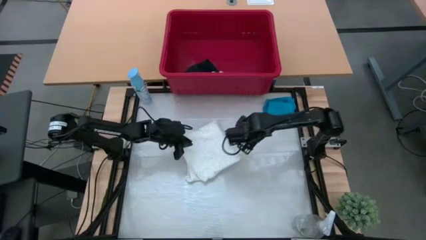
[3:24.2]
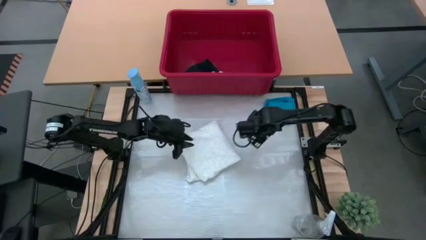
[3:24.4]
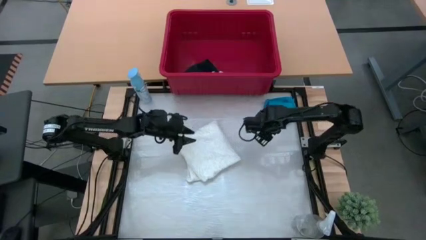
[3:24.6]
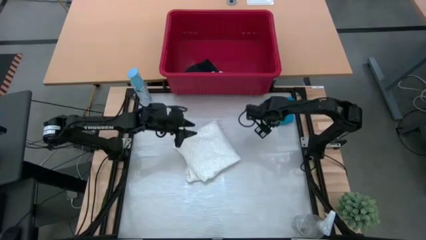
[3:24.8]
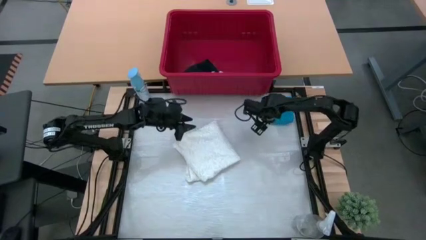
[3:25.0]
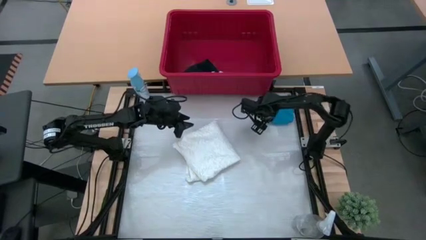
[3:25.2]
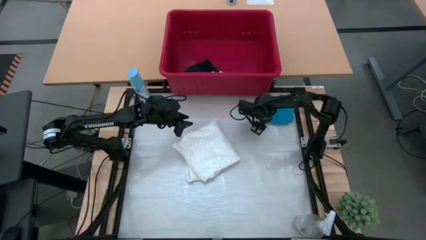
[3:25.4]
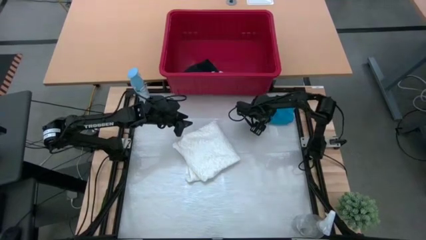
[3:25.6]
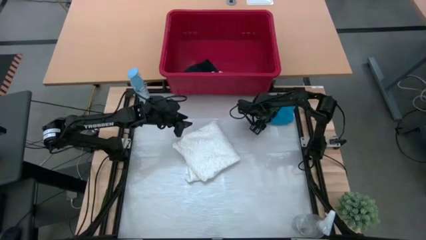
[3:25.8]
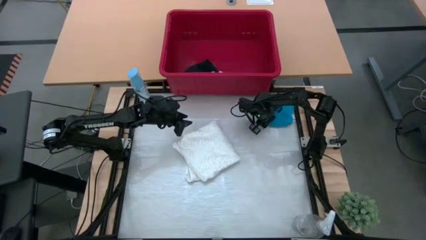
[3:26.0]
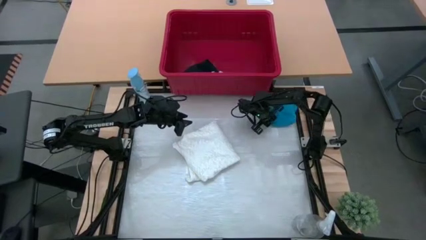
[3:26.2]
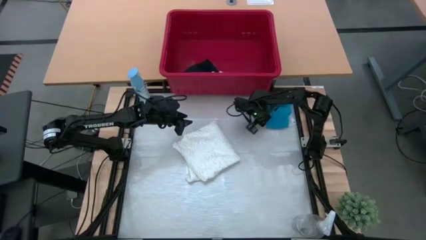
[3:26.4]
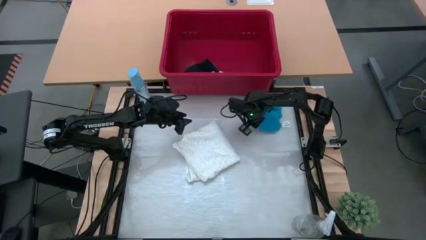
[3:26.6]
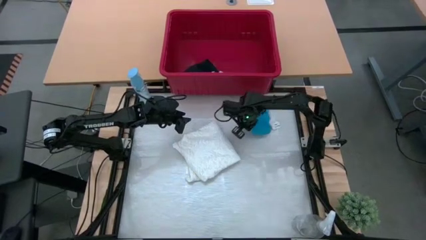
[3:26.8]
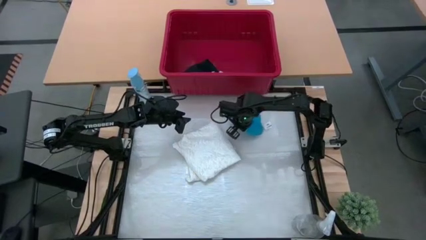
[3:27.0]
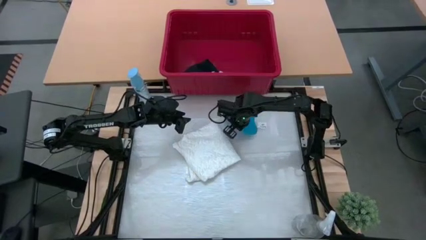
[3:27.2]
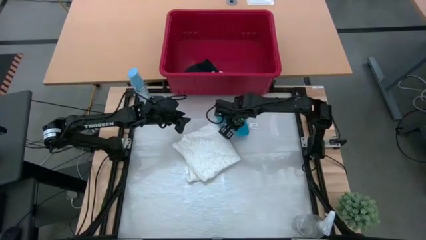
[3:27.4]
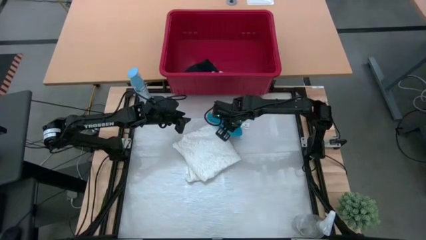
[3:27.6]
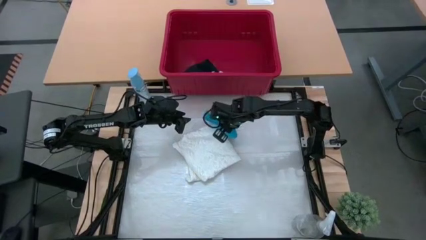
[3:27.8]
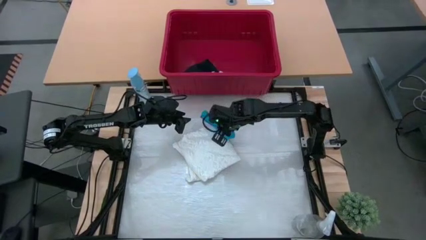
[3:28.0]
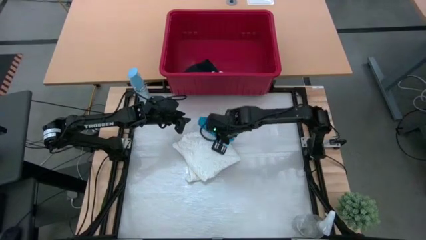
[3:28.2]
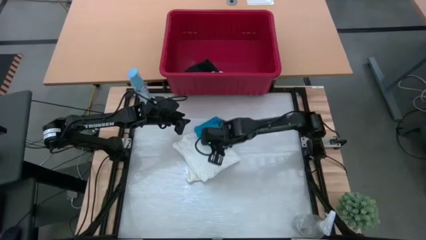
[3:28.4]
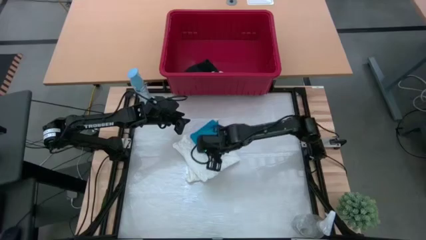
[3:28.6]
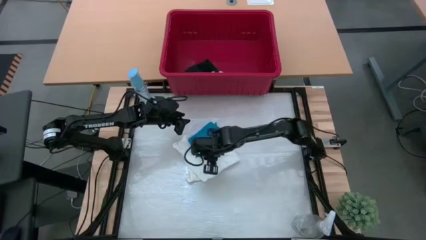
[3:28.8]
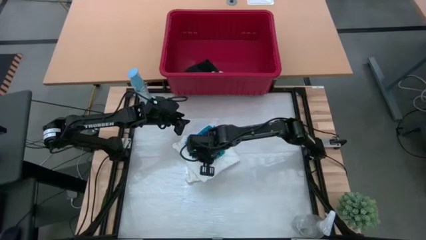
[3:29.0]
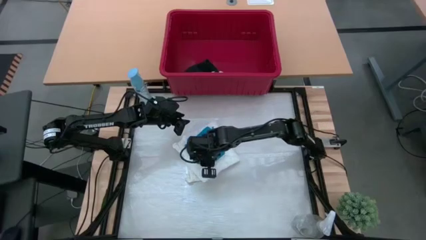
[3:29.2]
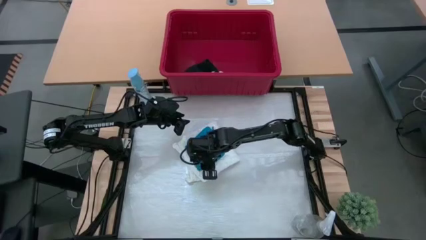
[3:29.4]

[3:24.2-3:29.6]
Task: Fold laundry
Stack the folded blue shorts on top of the folded white blouse

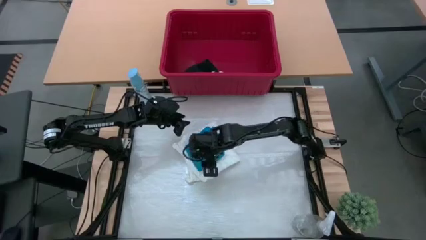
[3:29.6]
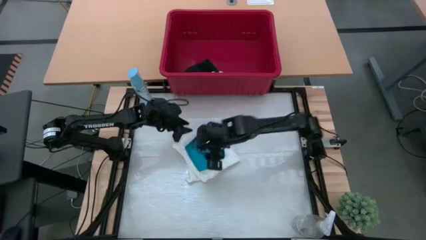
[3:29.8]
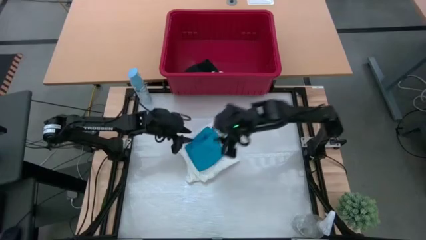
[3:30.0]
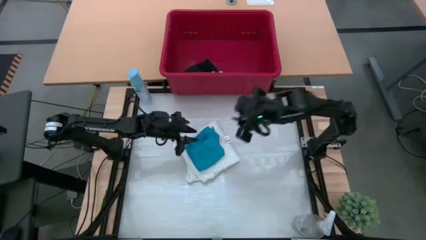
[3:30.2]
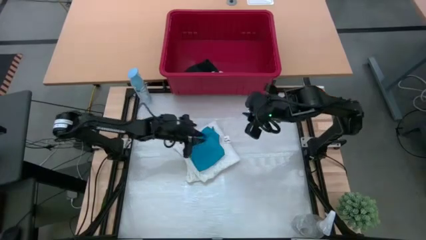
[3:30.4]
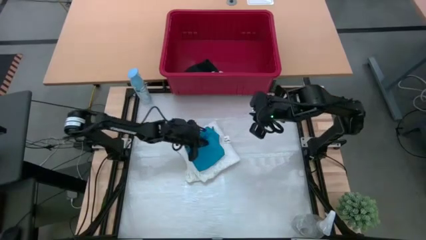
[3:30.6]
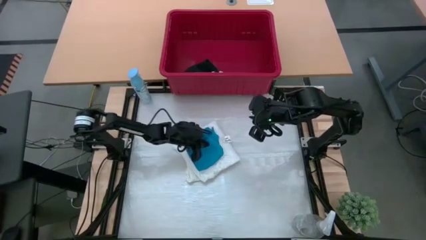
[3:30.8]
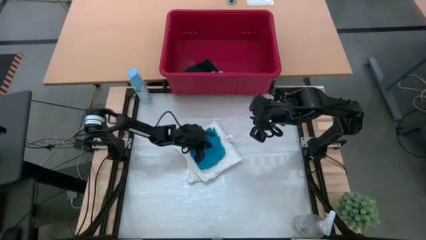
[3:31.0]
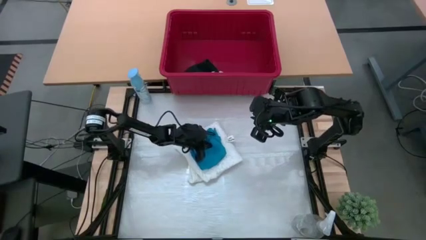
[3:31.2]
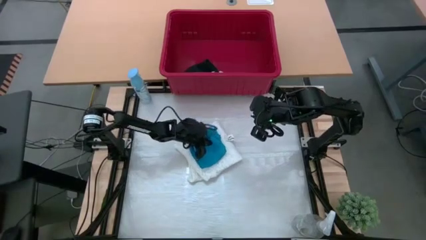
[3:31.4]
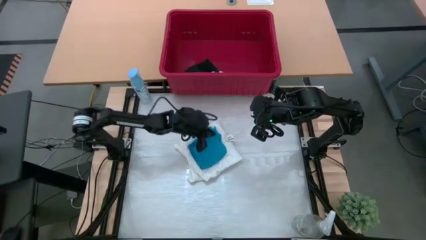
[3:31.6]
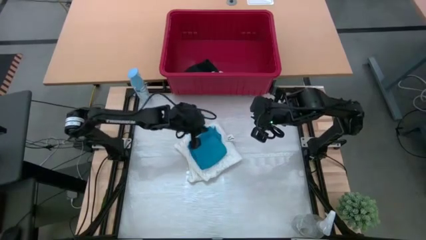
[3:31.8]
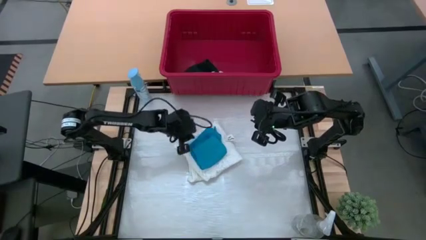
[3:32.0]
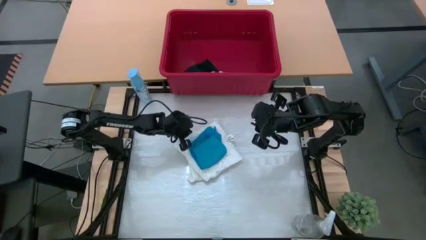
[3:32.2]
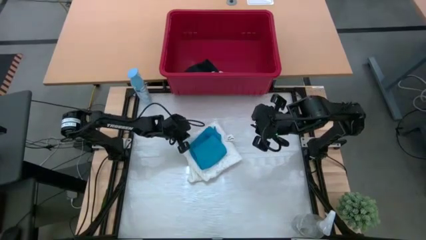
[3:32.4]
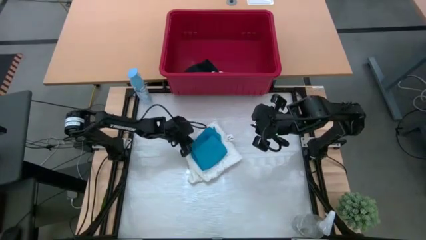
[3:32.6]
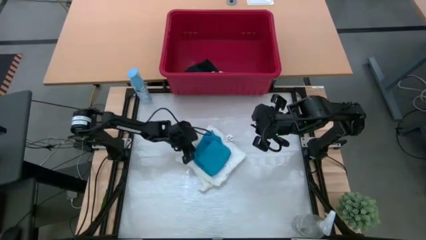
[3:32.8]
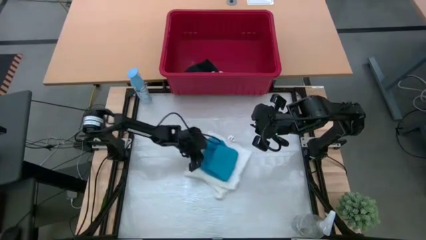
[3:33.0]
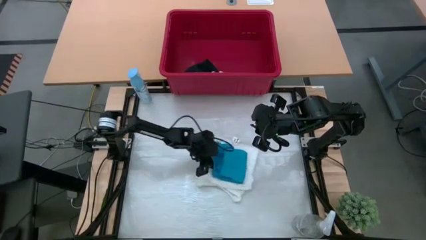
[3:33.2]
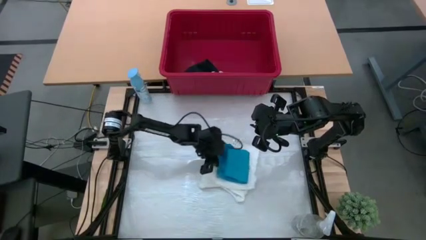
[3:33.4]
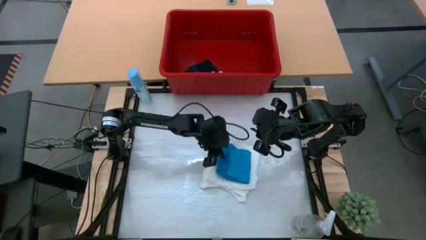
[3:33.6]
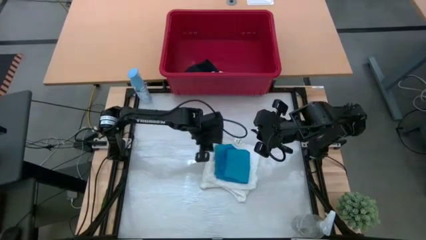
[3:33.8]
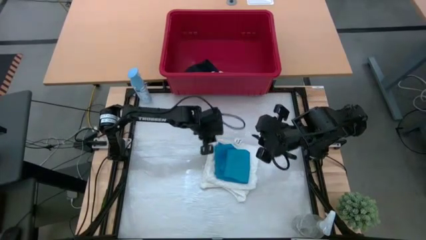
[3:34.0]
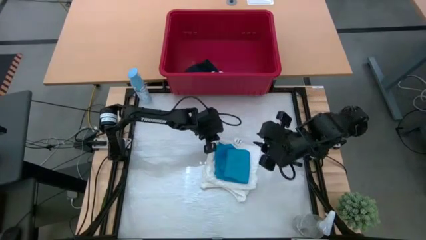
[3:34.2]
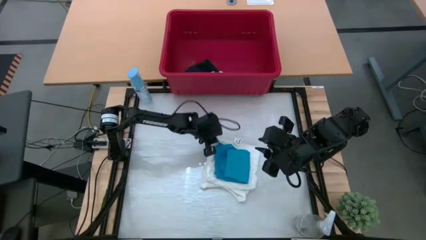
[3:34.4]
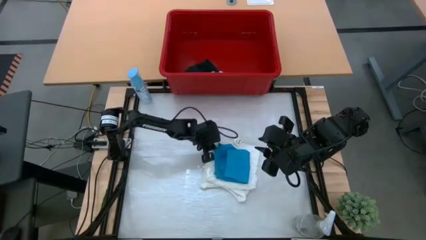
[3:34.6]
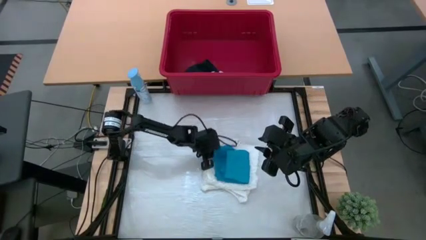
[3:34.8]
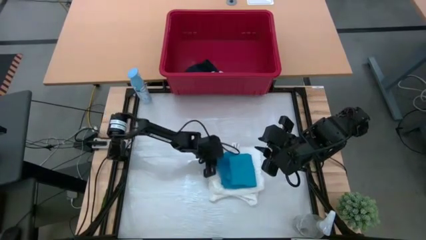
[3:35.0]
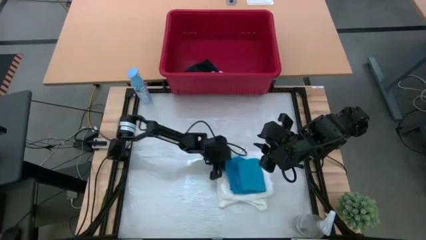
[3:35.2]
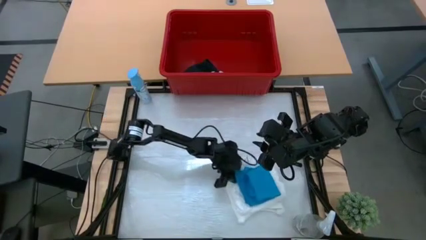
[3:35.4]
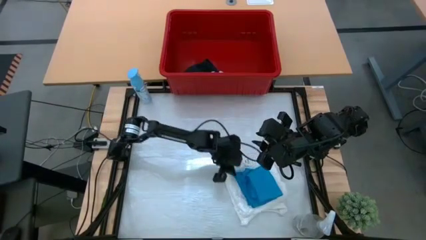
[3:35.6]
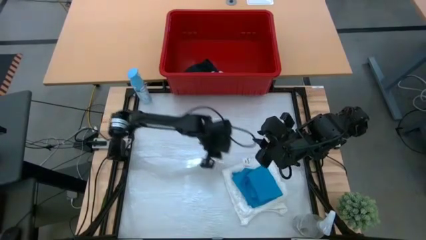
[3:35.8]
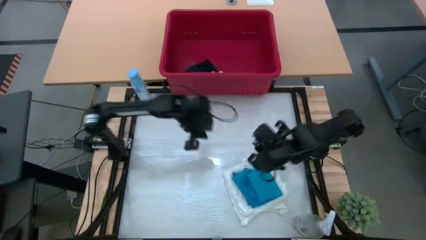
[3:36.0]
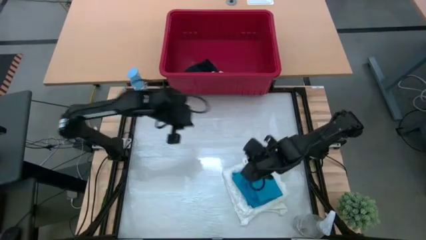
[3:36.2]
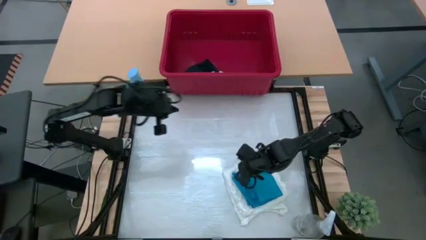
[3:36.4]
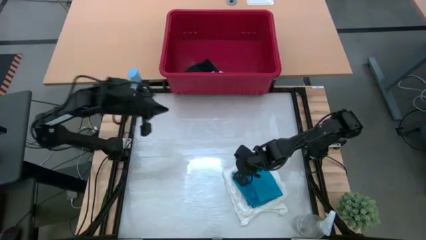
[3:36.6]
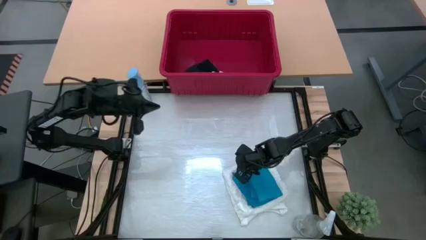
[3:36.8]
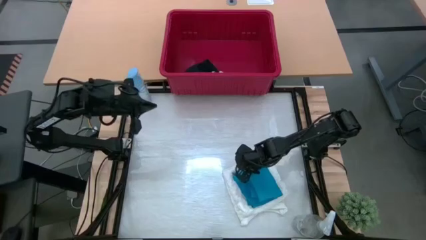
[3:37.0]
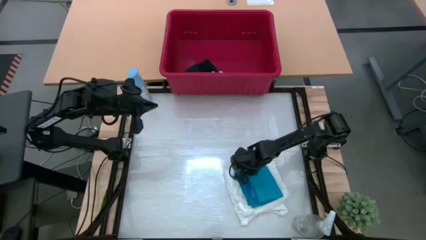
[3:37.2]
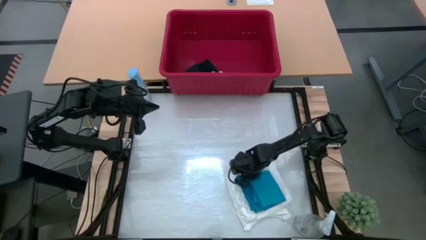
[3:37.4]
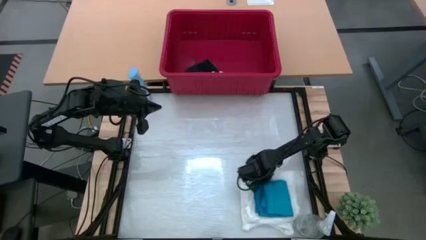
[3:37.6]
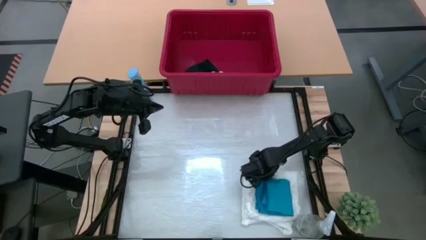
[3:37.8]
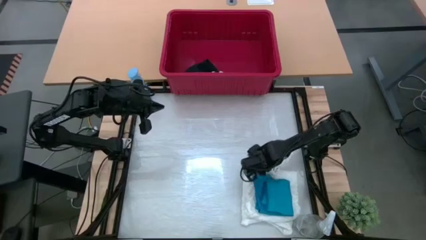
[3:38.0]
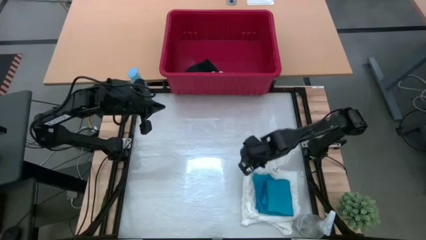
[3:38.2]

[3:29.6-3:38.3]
Move the stacked folded clothes to the bottom right of the table
